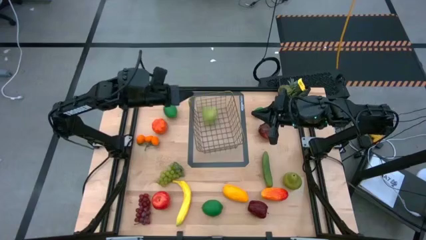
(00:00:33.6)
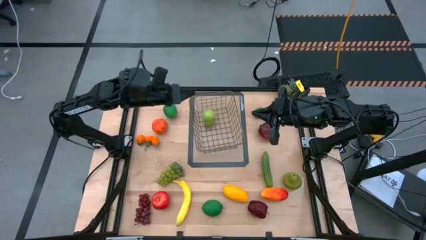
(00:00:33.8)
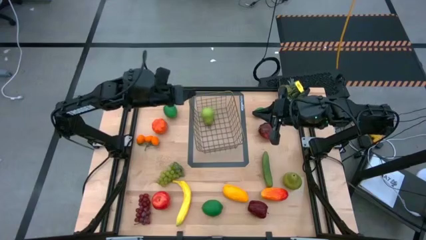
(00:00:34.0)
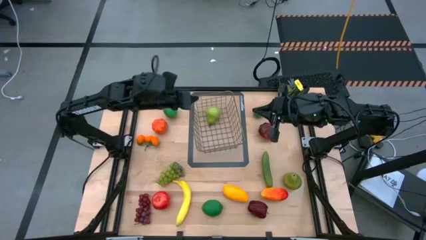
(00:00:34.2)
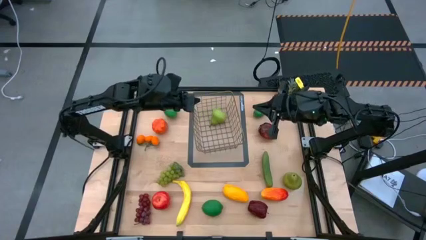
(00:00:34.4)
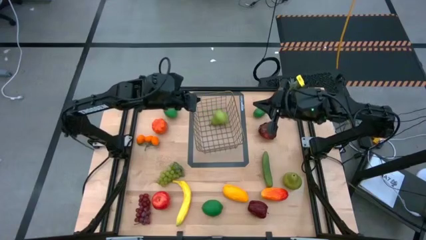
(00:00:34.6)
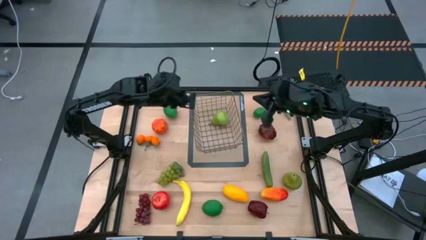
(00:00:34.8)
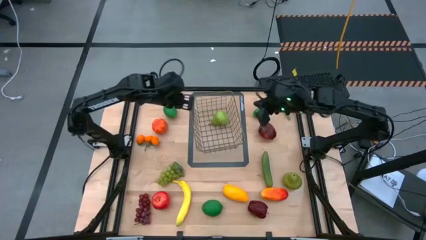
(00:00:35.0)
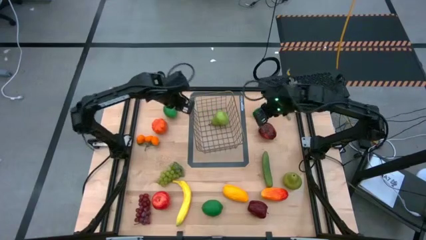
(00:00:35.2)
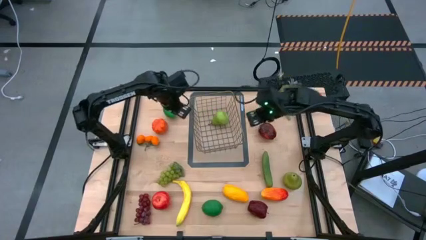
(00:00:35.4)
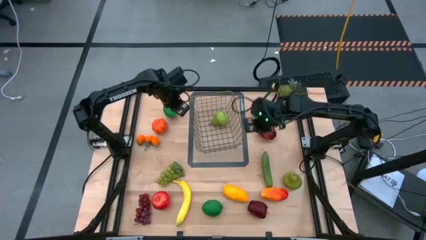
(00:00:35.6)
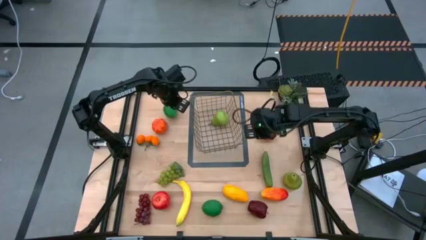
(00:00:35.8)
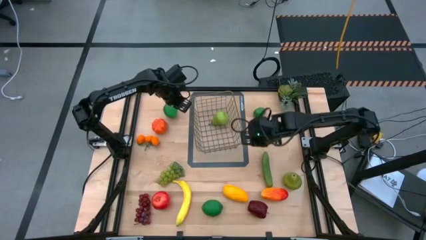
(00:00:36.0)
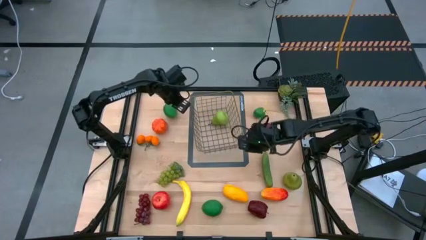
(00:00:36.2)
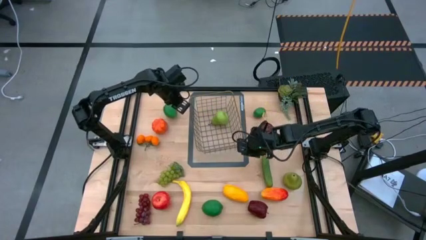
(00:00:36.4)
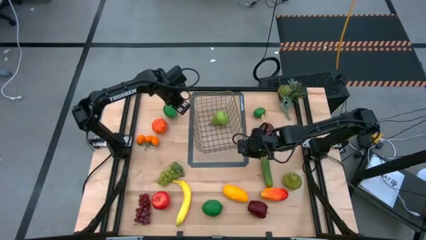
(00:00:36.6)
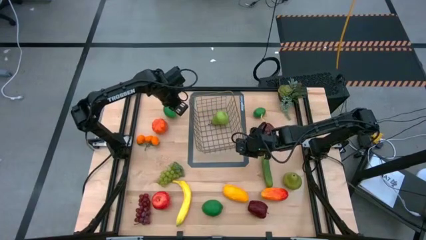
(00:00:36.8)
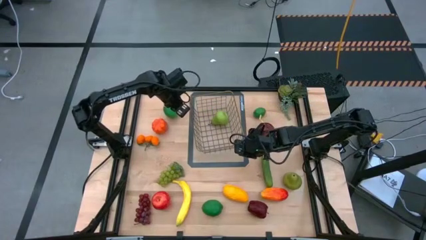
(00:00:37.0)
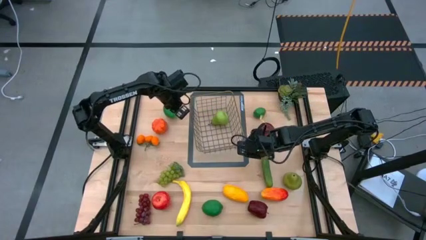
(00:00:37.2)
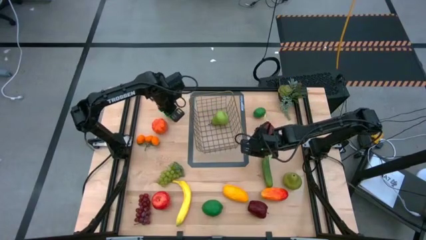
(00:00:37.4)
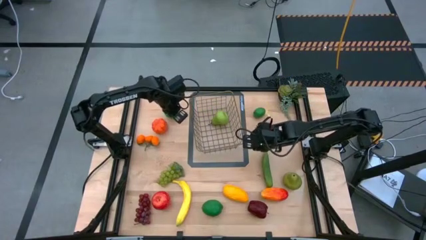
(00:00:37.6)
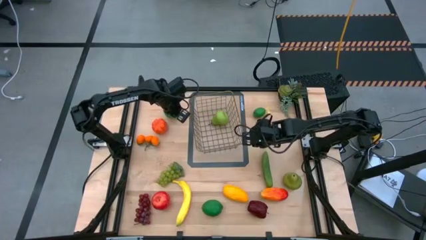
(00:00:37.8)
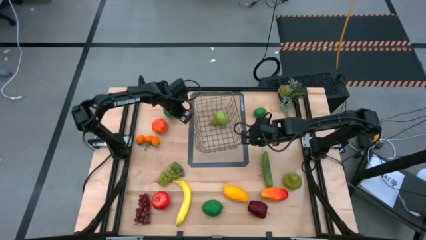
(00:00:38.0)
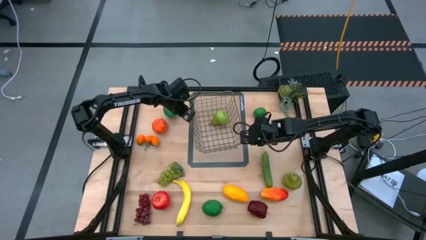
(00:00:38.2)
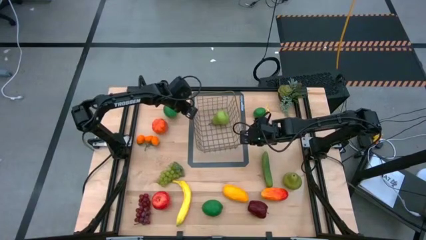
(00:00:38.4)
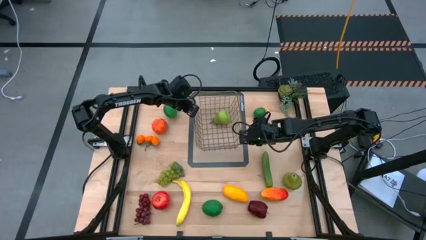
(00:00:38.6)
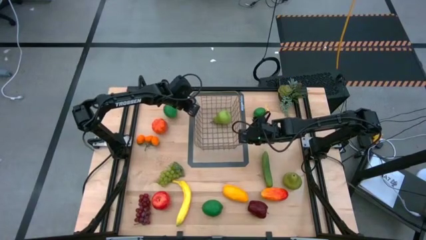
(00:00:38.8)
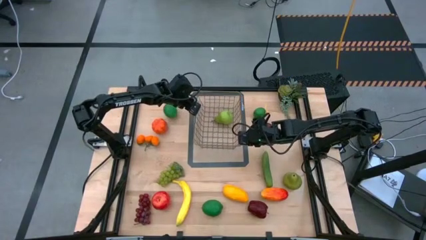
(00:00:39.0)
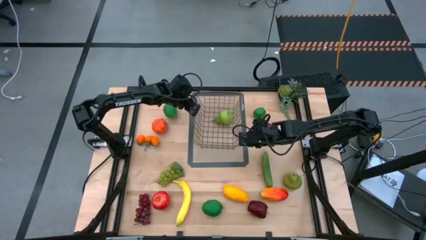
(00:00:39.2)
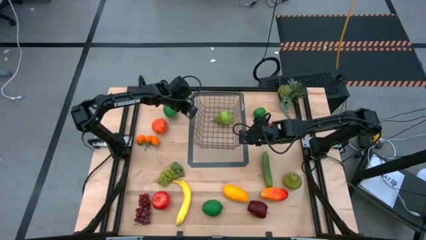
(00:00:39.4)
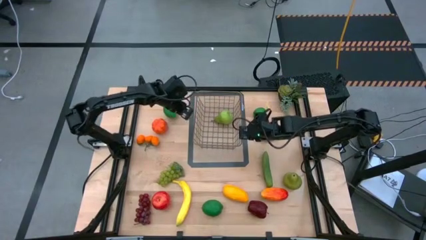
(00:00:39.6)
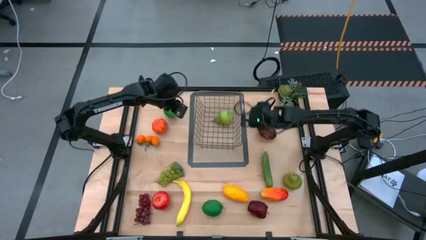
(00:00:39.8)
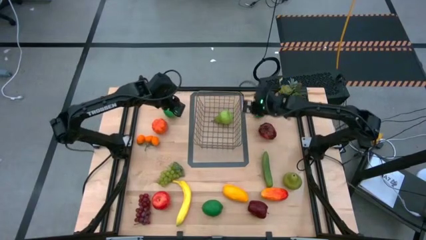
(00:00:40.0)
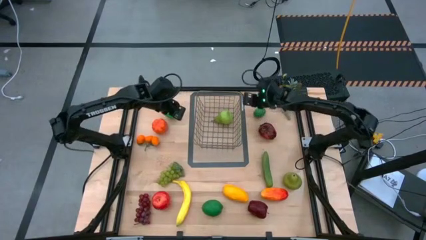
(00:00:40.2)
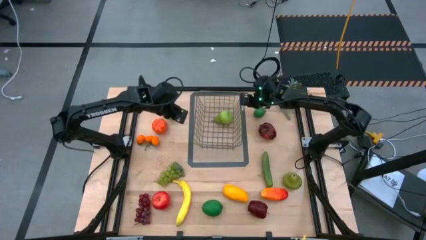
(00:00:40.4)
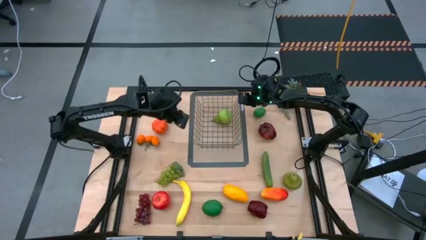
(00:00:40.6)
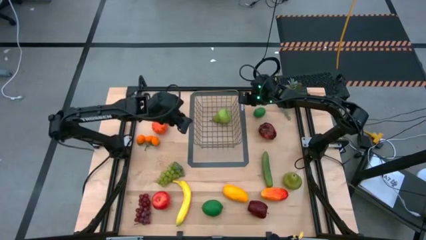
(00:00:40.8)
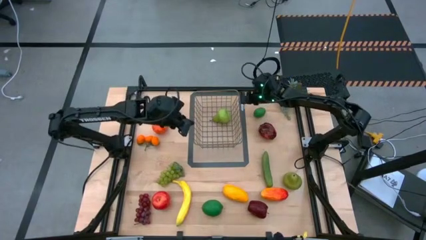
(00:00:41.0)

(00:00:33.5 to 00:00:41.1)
Task: Build produce basket
Adjust the gold wire basket

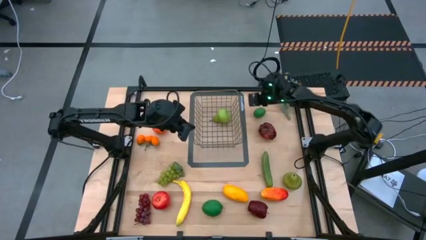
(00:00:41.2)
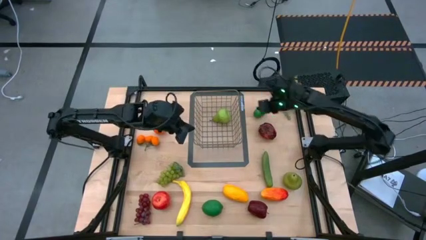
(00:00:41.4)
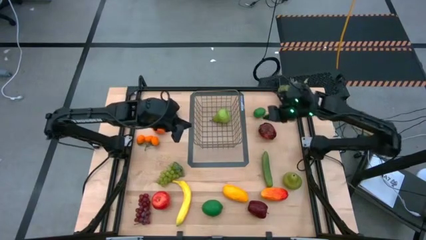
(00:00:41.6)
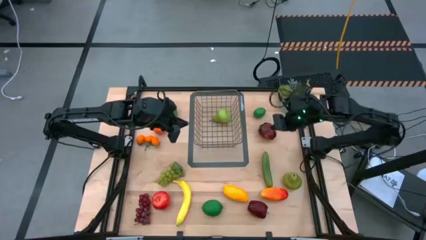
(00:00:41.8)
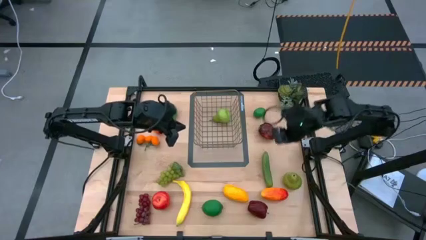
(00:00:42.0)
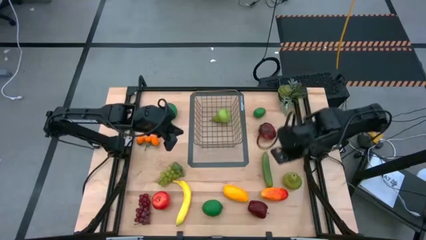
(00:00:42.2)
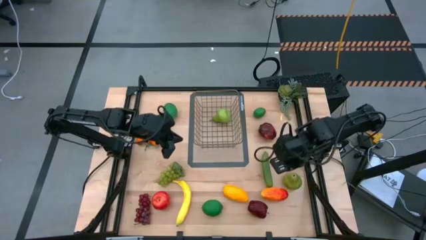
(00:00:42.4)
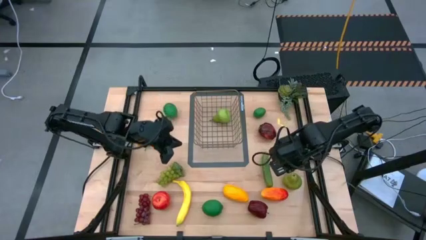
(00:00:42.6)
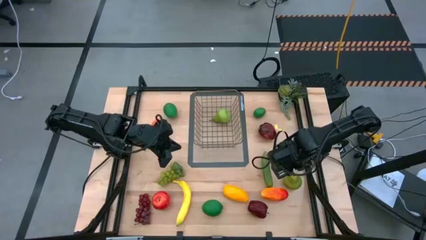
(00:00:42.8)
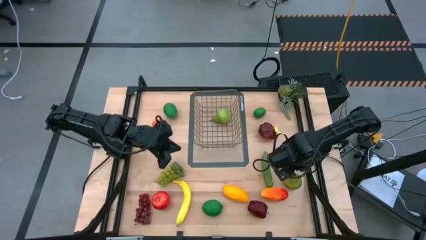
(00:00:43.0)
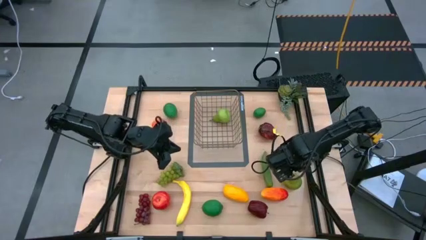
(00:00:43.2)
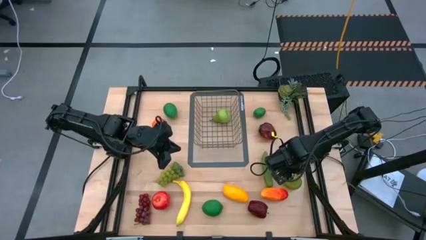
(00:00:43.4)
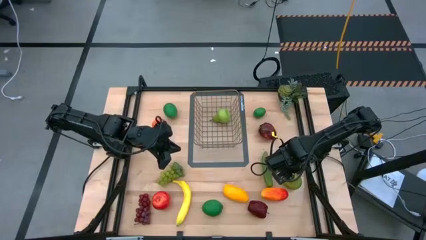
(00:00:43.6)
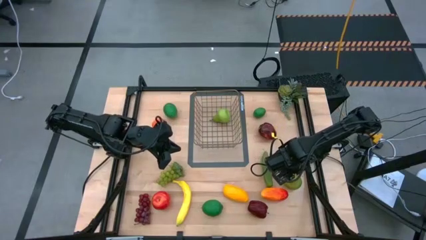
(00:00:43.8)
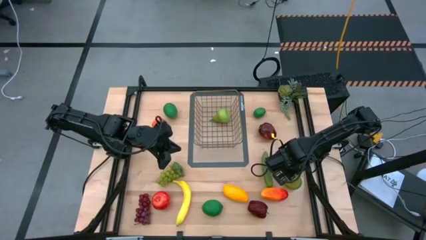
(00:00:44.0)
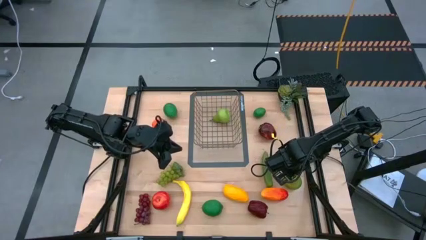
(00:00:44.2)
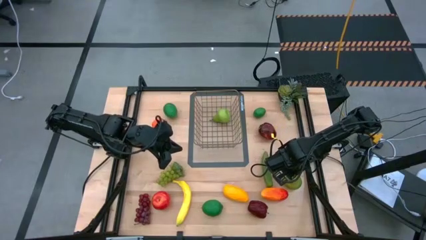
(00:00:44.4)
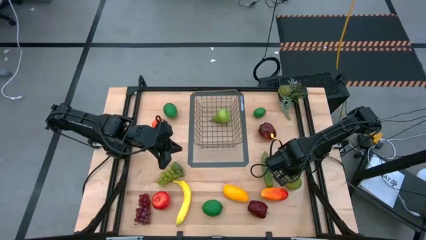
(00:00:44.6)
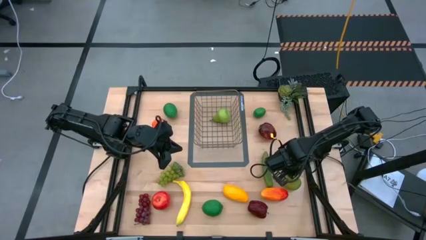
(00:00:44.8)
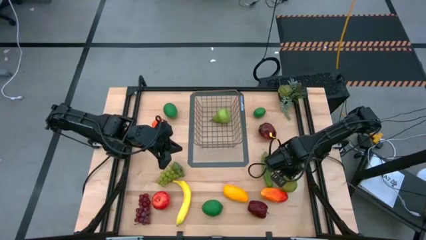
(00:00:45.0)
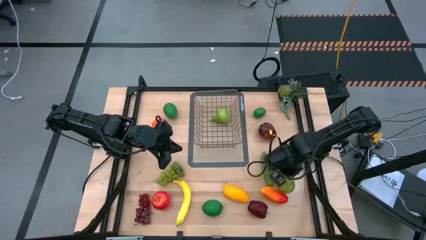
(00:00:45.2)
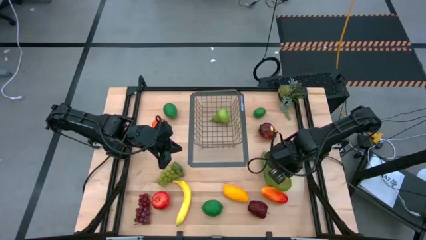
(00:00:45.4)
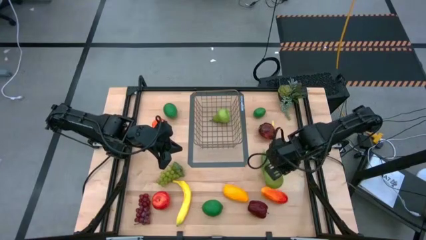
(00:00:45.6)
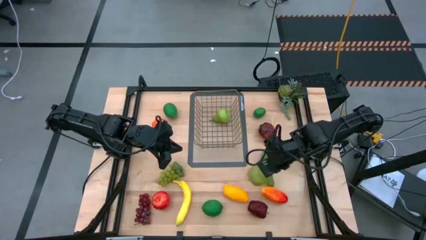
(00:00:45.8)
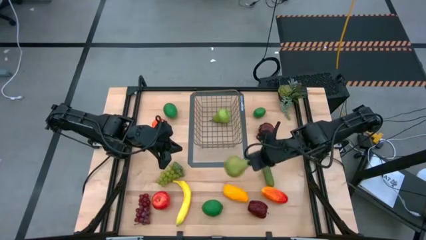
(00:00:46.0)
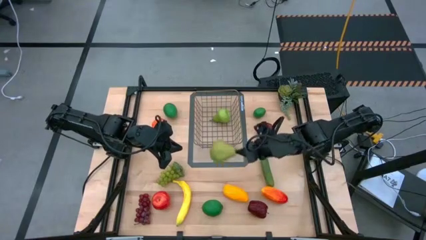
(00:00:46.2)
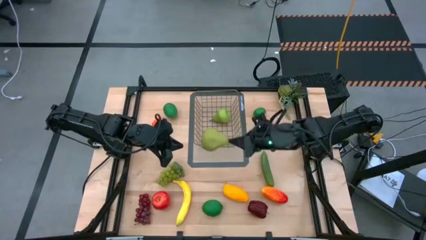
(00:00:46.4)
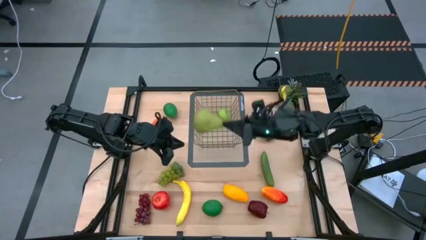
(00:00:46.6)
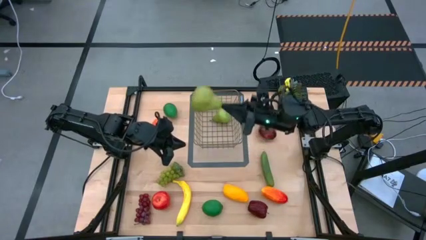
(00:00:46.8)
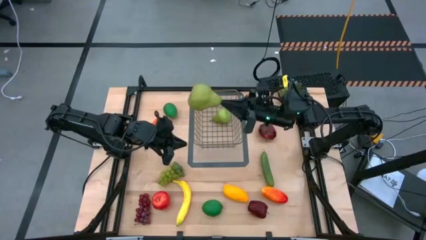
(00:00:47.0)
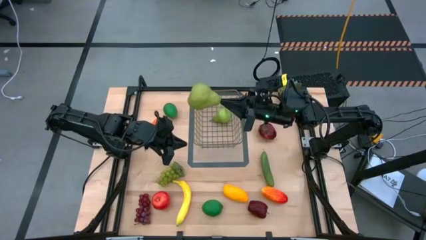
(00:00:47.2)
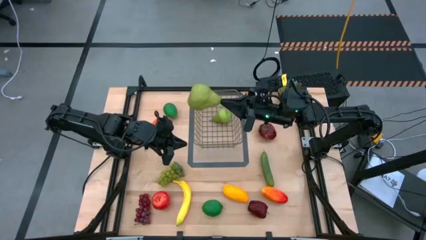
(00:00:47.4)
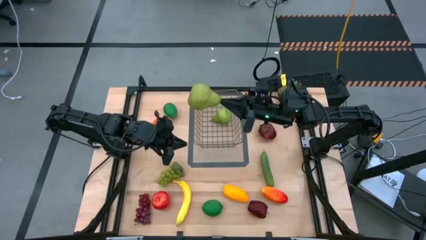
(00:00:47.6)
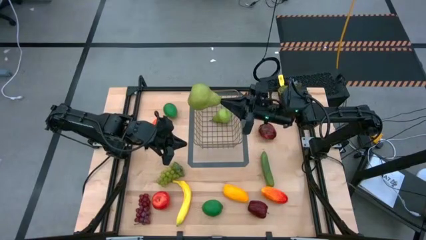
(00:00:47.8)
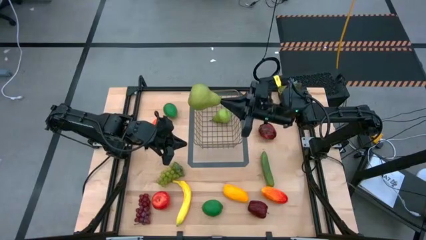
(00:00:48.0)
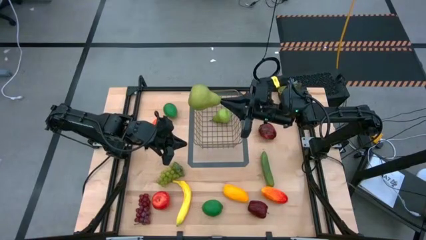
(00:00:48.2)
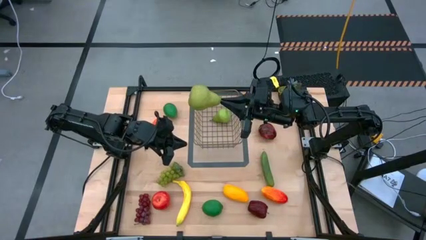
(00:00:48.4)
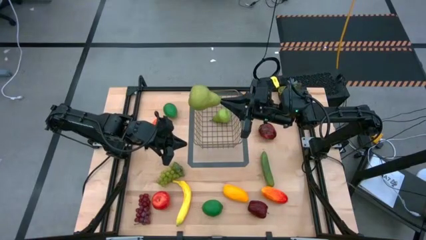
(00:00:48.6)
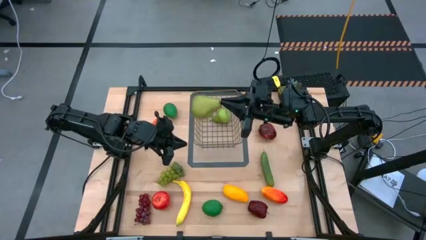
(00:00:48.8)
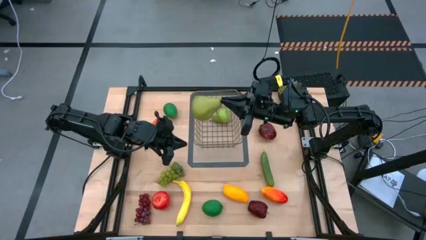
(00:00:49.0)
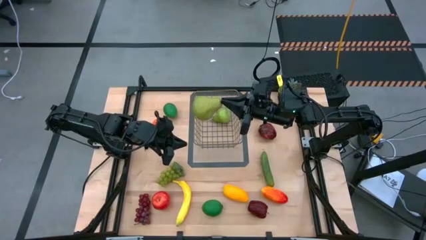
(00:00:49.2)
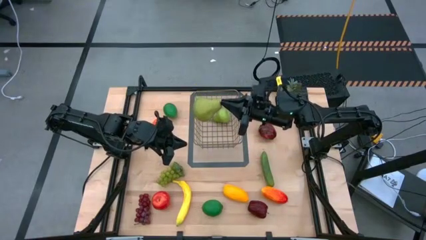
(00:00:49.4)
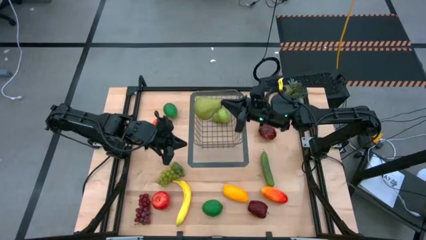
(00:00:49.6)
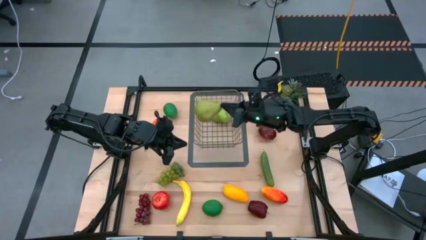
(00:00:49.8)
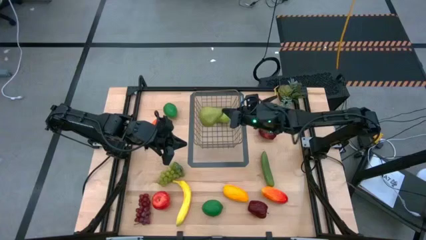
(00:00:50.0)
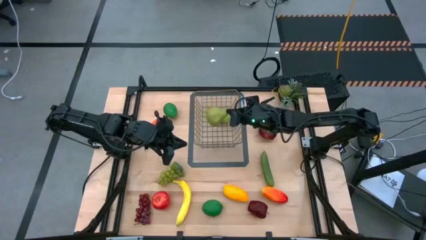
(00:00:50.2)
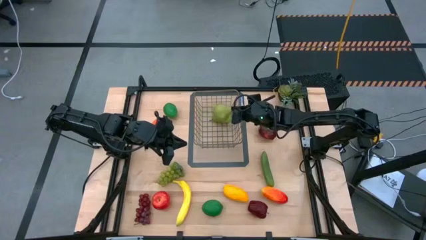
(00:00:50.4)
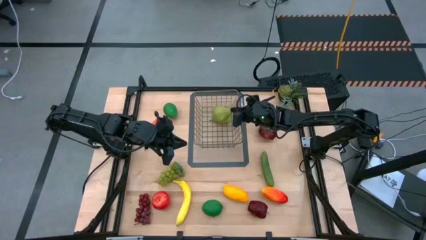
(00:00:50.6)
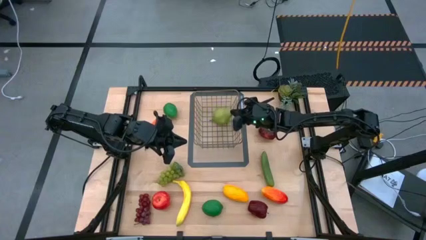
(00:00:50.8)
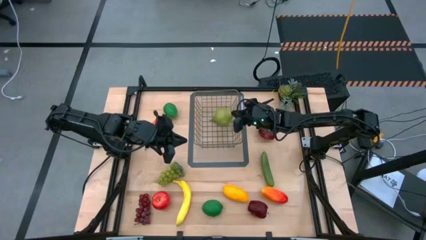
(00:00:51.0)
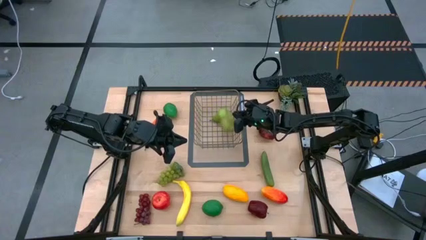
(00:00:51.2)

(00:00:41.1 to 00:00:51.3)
Put the green pear into the gold wire basket
